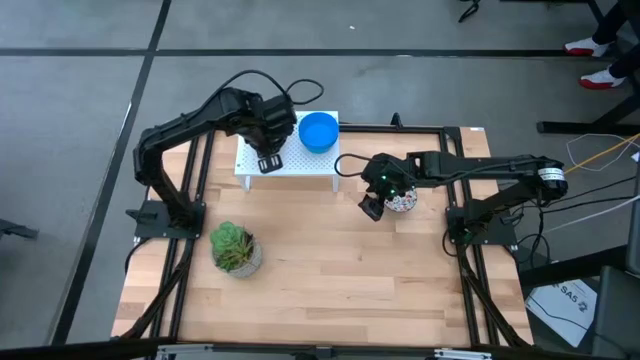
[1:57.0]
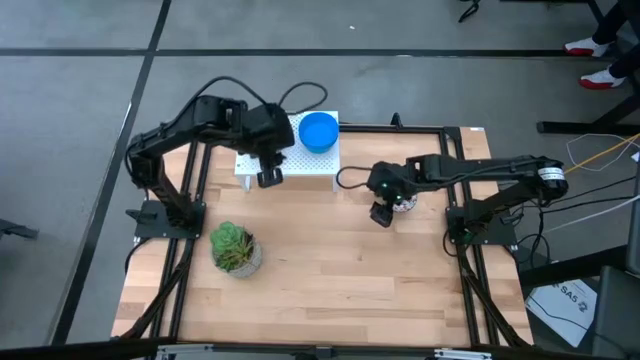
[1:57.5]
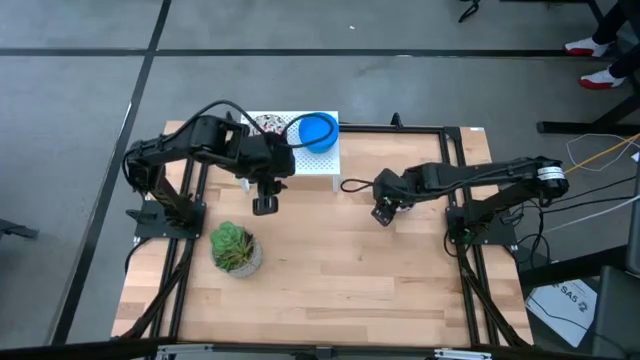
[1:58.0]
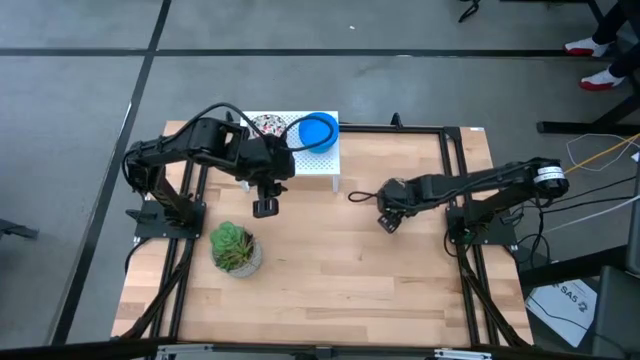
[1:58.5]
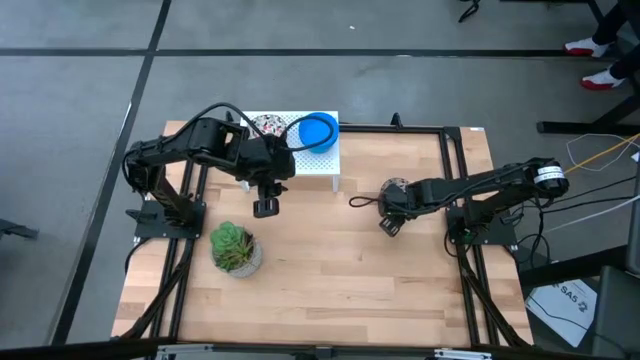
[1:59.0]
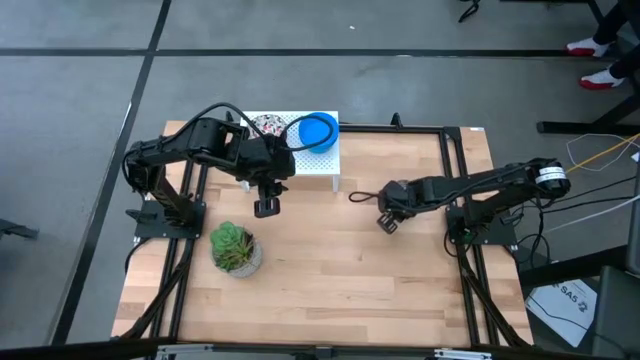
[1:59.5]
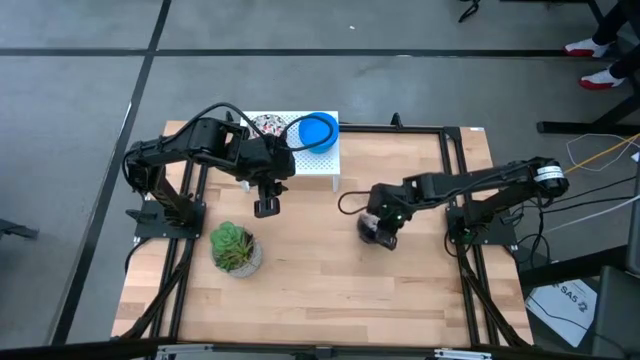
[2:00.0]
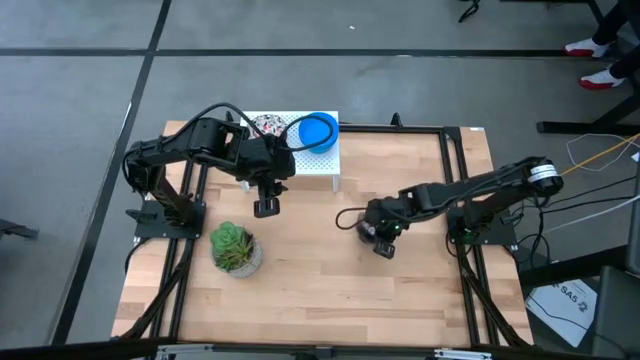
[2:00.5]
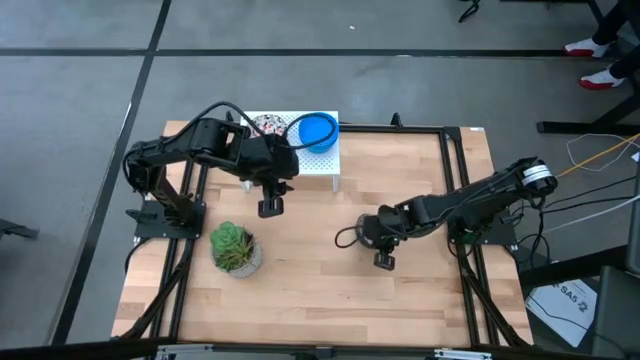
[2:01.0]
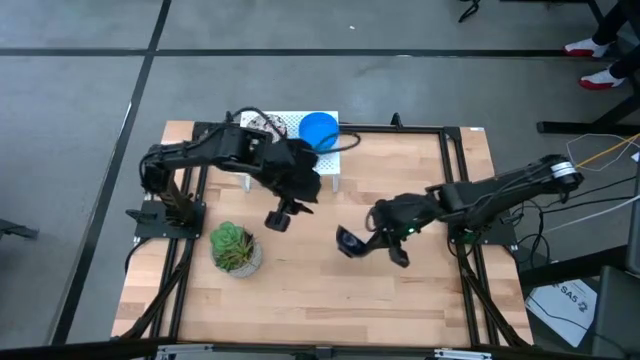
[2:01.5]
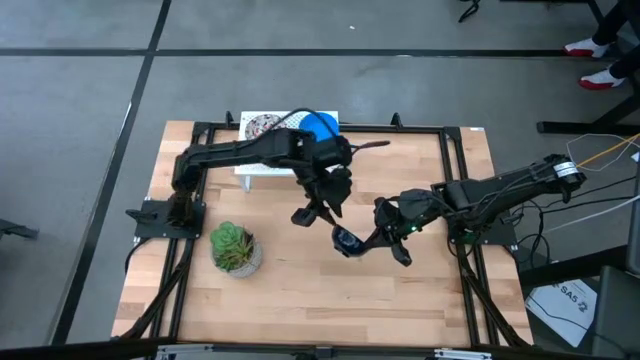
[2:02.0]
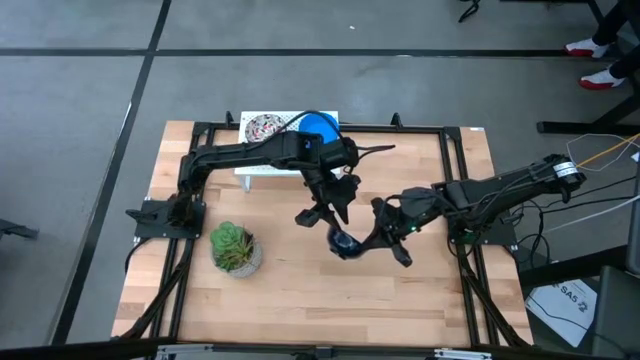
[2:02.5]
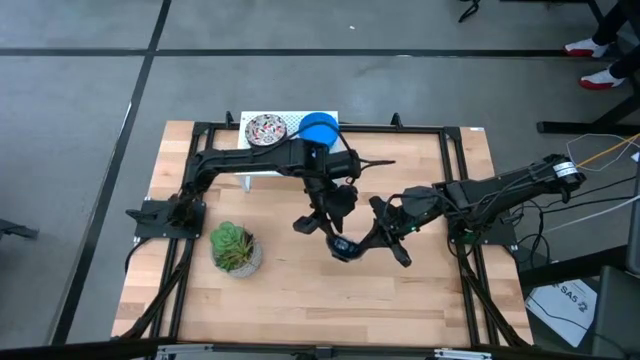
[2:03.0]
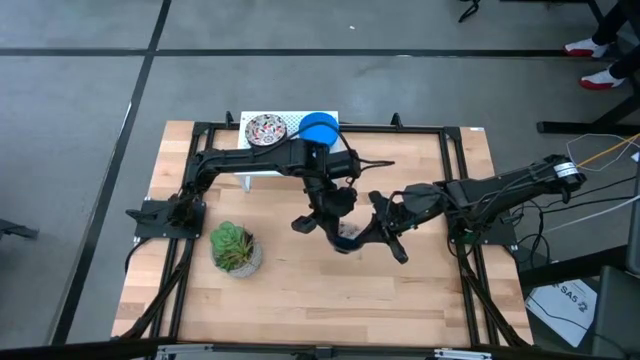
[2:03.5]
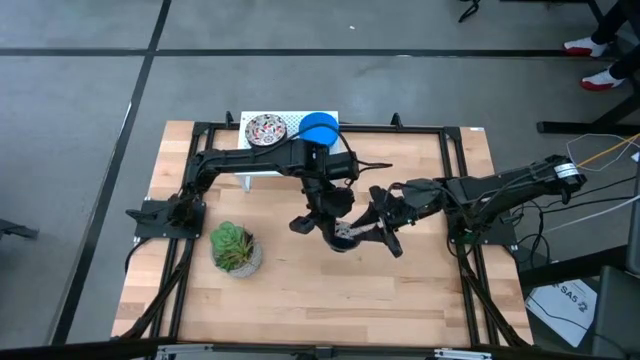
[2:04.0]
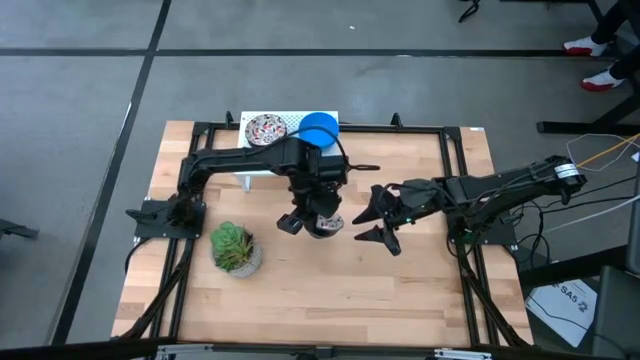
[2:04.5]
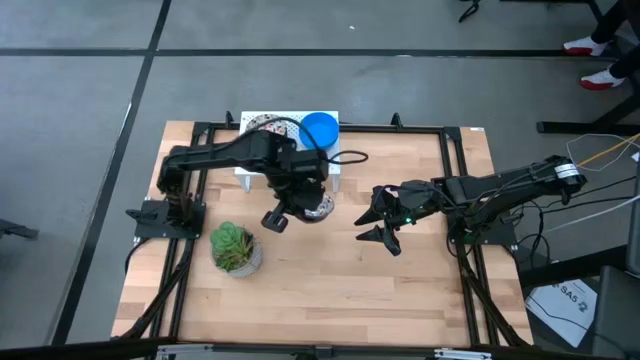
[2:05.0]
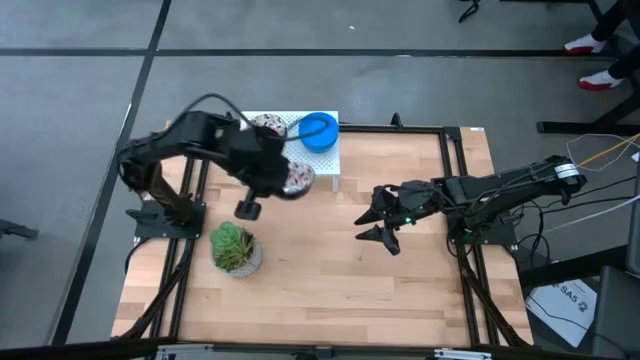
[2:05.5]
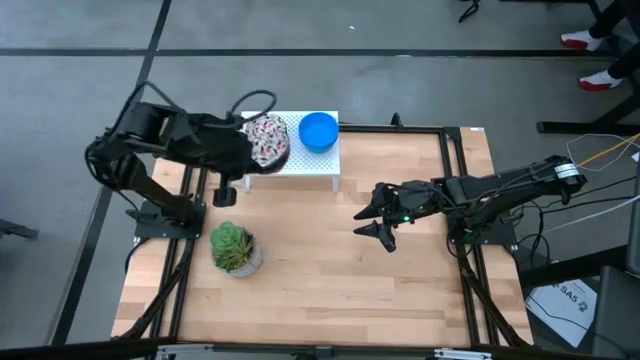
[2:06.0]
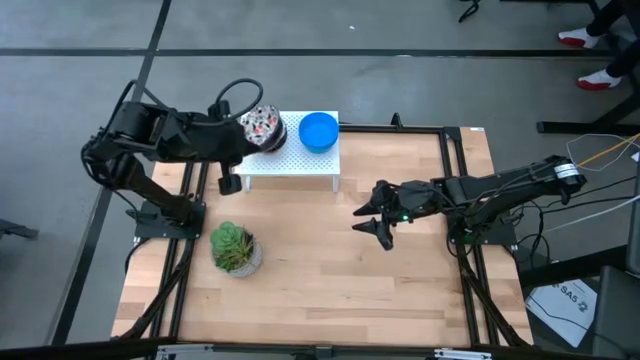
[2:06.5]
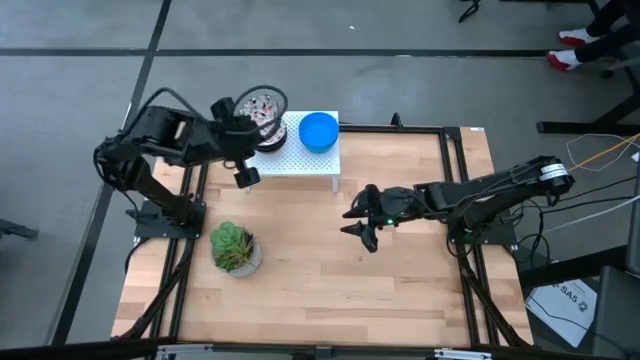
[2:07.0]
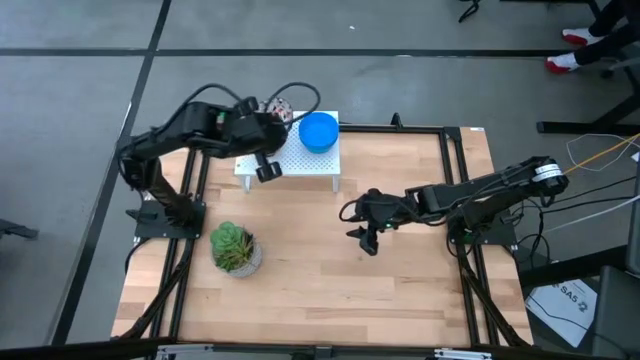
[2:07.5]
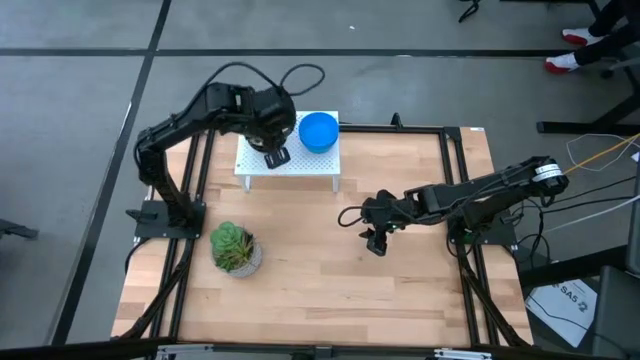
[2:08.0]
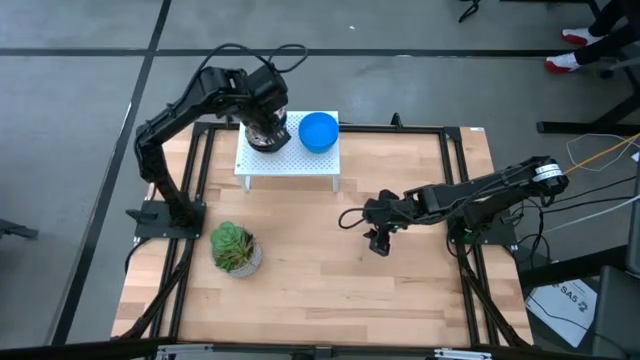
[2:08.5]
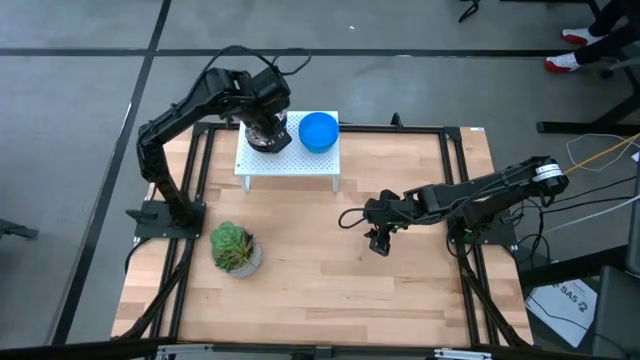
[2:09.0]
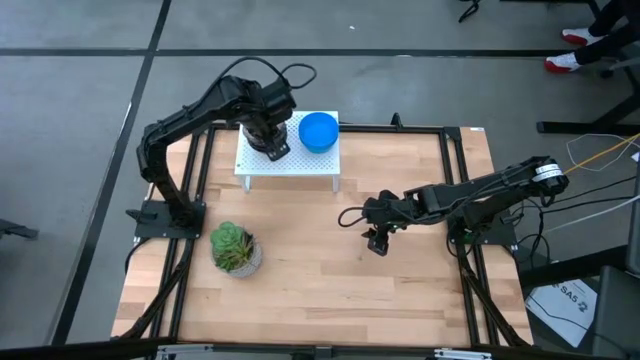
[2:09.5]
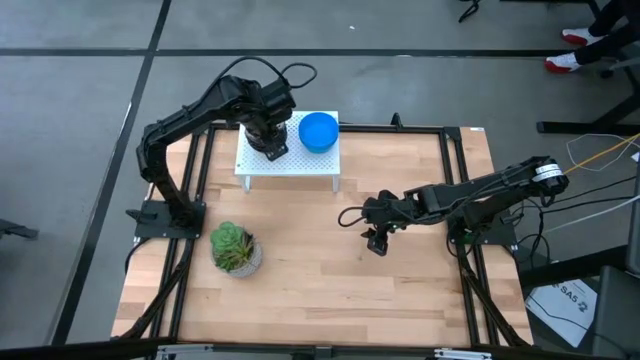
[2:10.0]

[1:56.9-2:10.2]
Task: Pick & Place Mini bowls
Stack the white patterned bowl on the white patterned bowl on the shelf

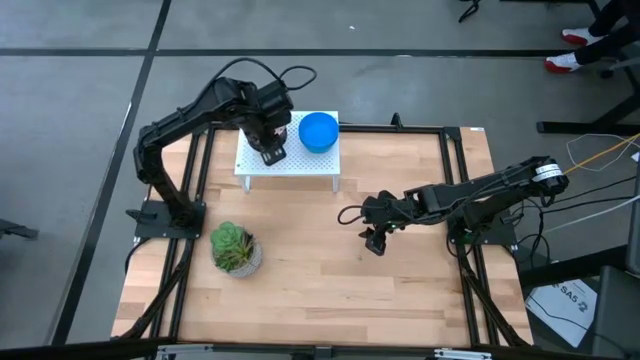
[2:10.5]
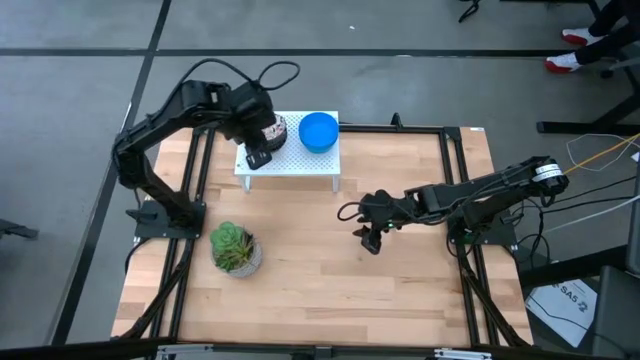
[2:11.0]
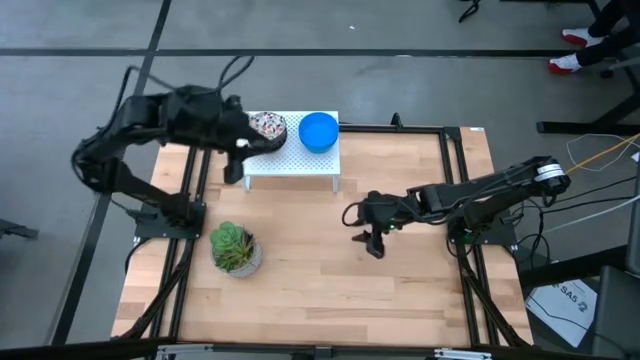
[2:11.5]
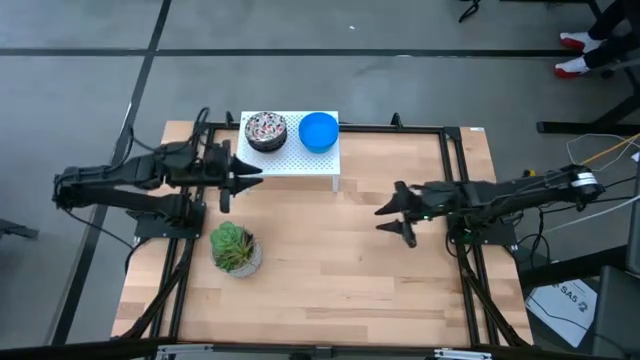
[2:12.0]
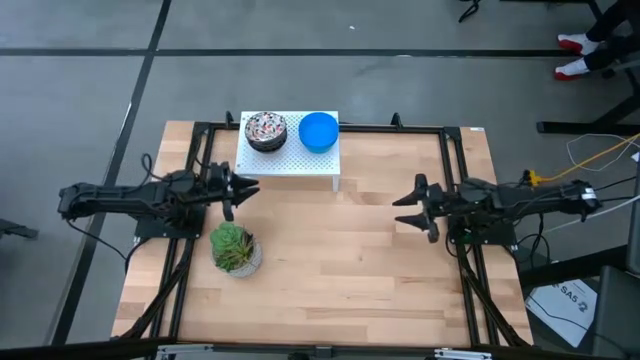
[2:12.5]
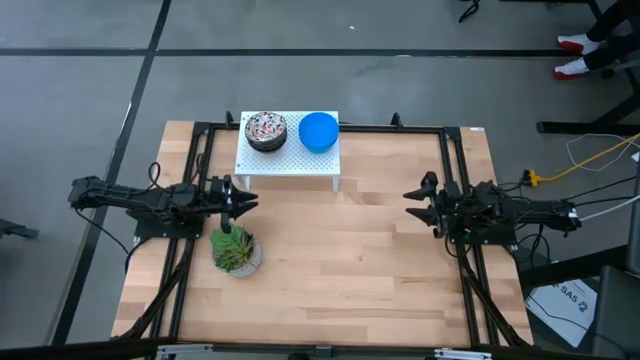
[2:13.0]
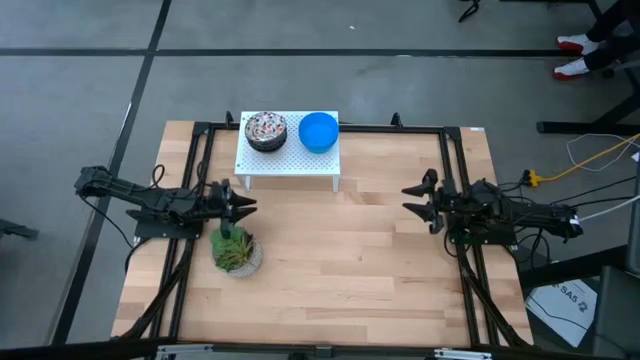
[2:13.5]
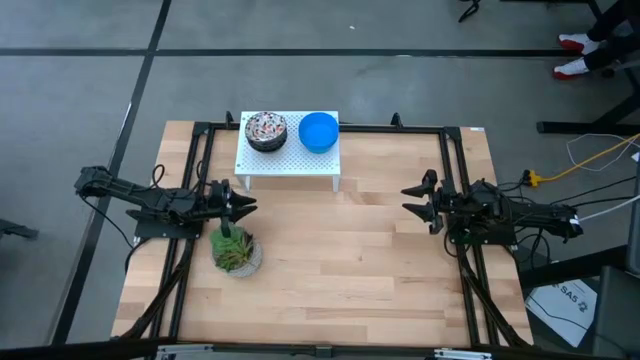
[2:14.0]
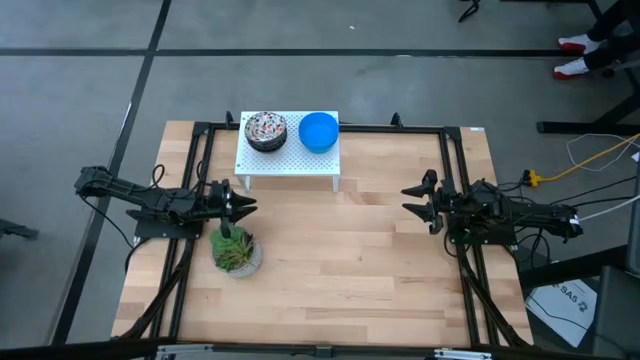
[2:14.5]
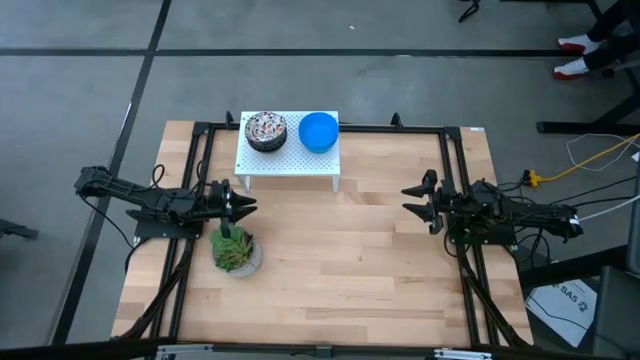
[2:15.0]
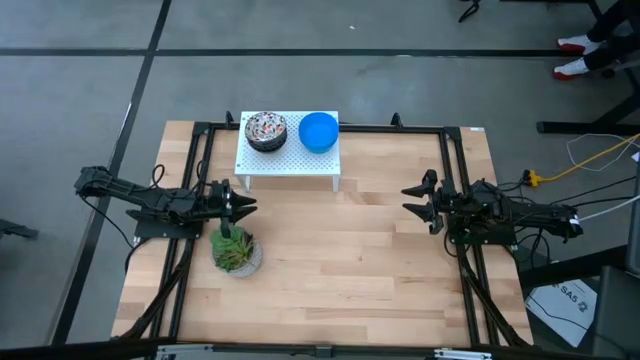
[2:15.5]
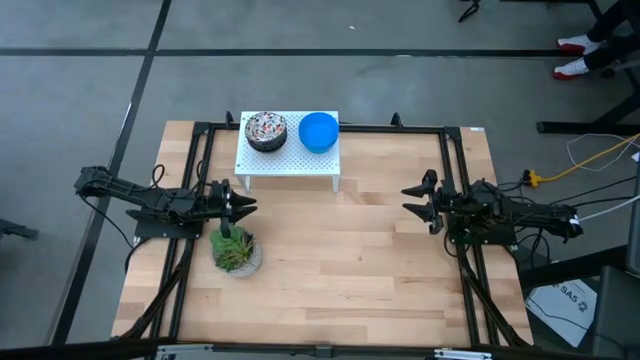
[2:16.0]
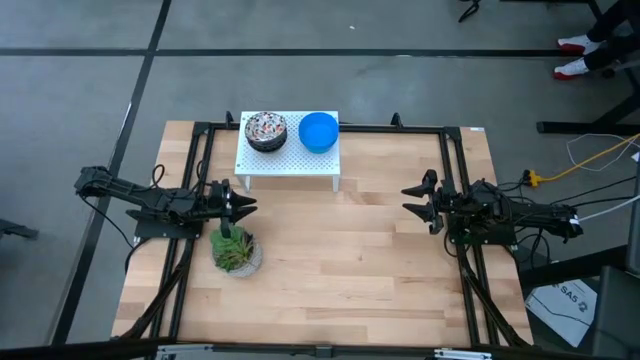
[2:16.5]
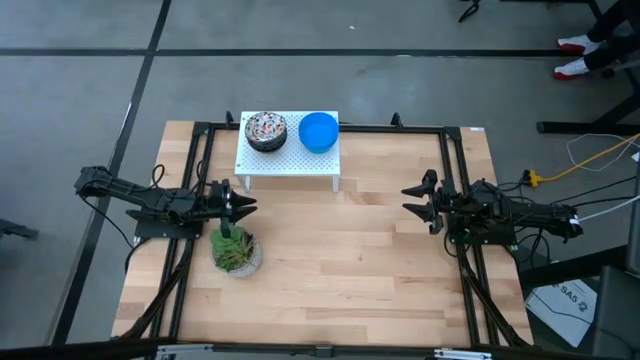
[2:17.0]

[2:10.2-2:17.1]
Return to Home Position
